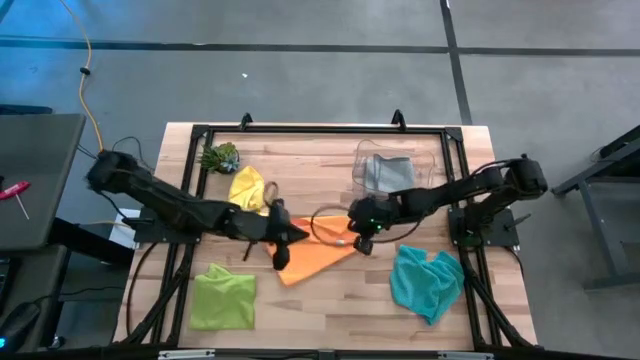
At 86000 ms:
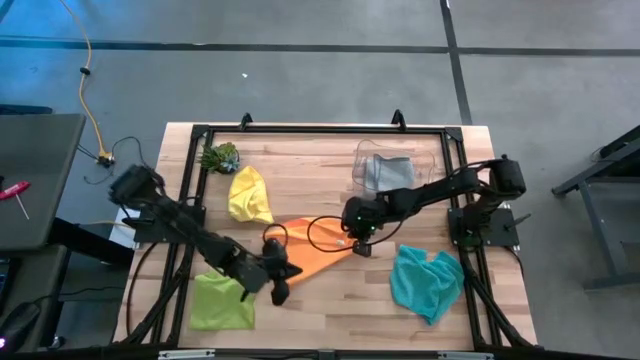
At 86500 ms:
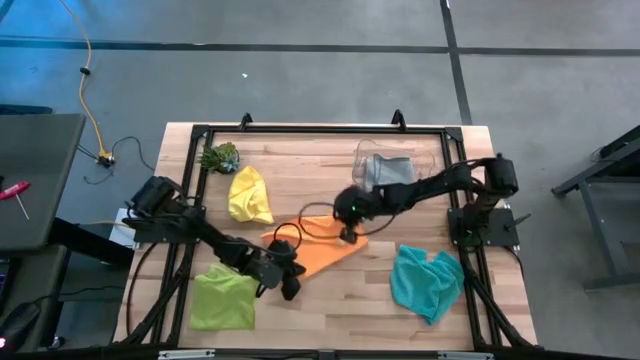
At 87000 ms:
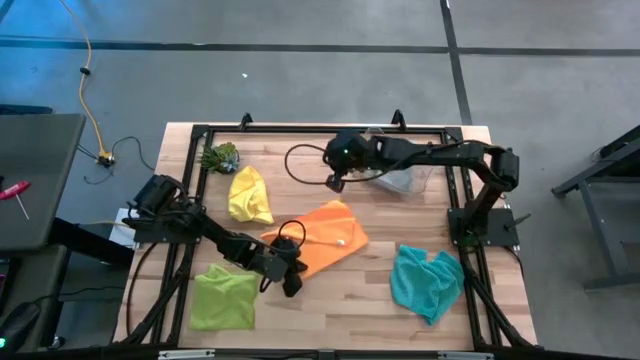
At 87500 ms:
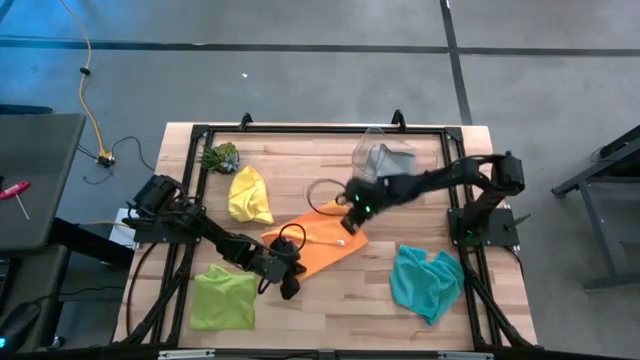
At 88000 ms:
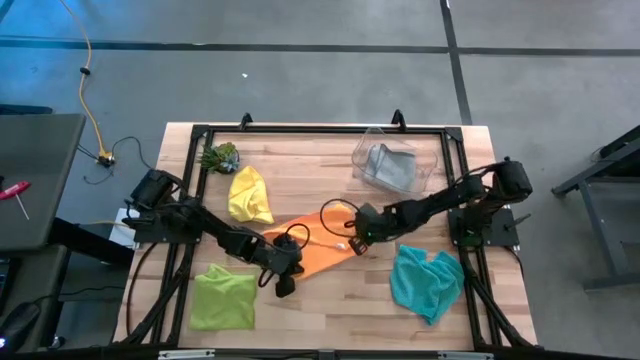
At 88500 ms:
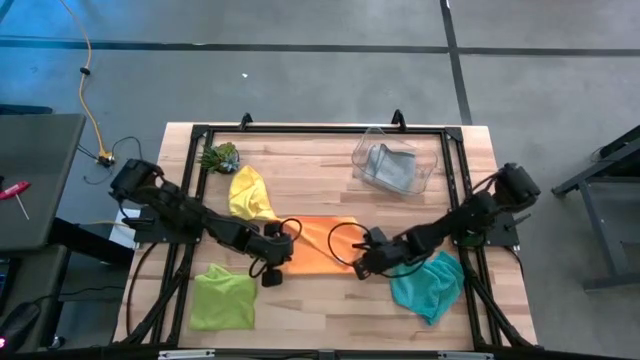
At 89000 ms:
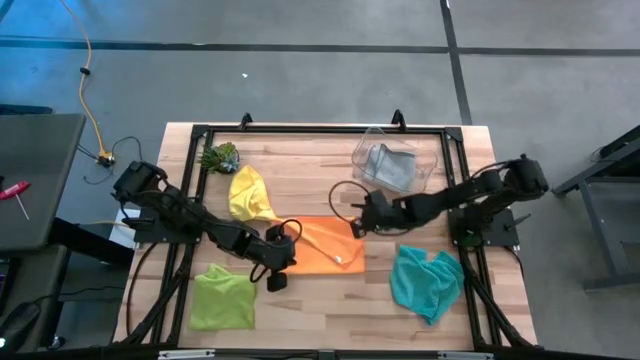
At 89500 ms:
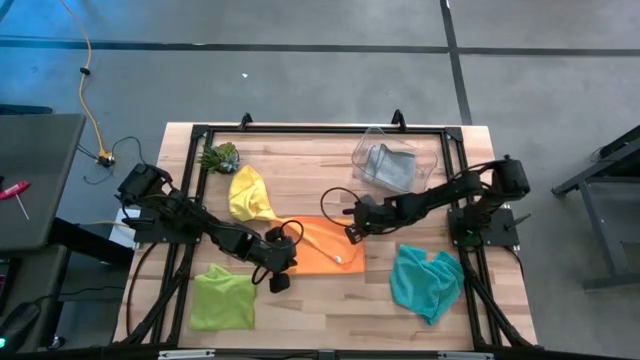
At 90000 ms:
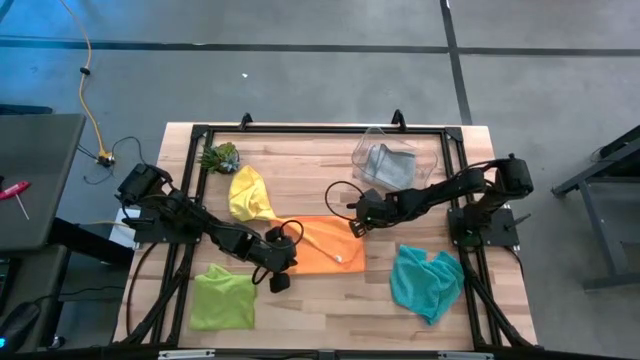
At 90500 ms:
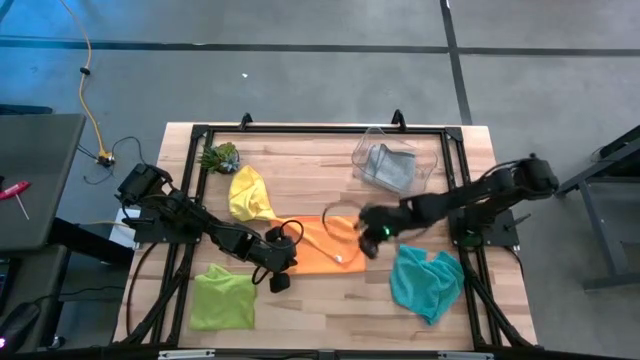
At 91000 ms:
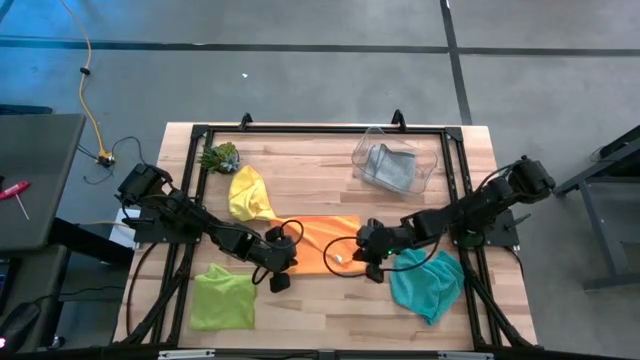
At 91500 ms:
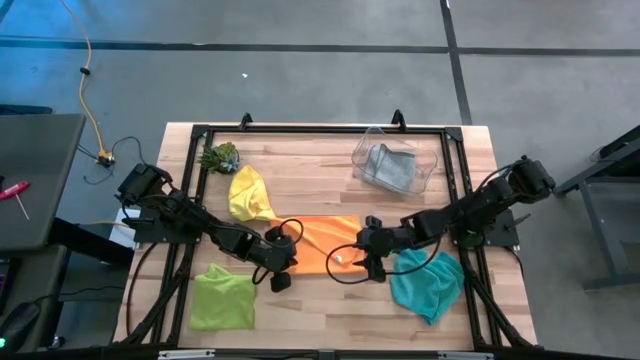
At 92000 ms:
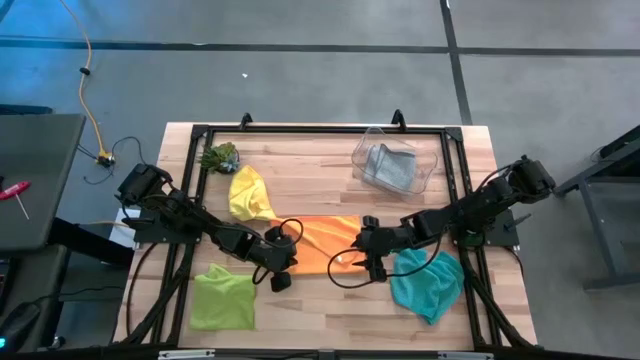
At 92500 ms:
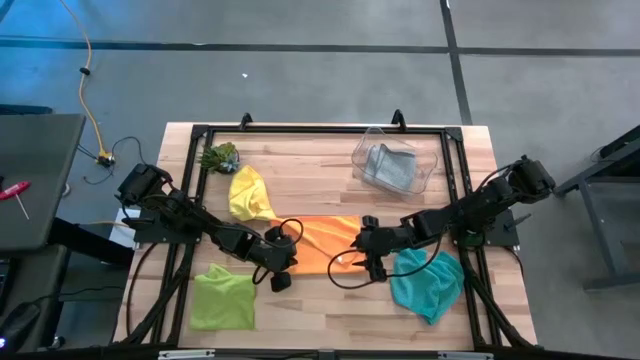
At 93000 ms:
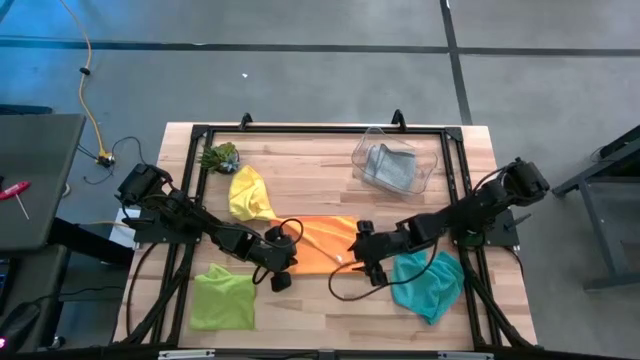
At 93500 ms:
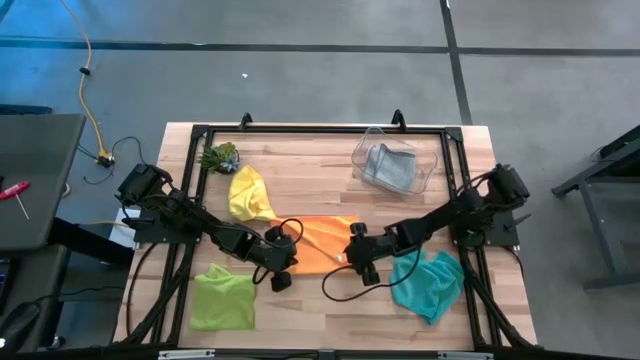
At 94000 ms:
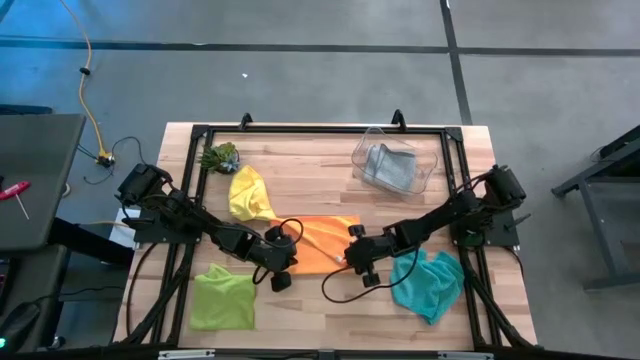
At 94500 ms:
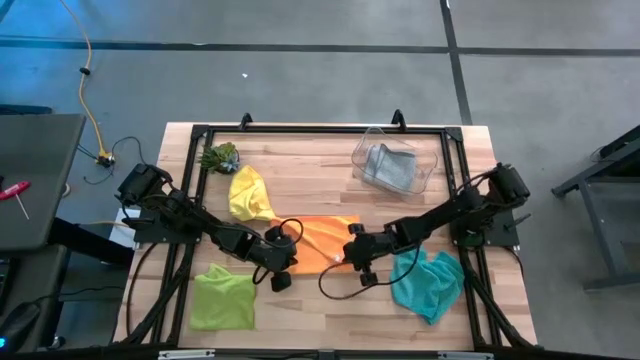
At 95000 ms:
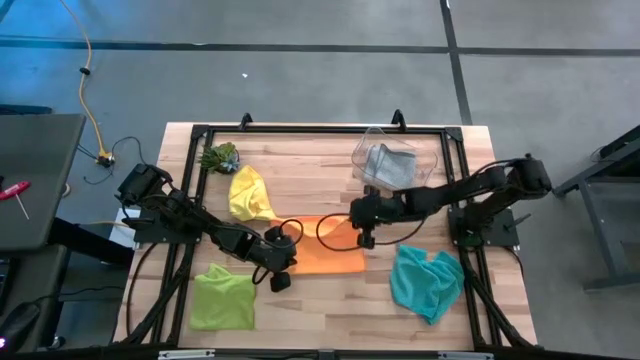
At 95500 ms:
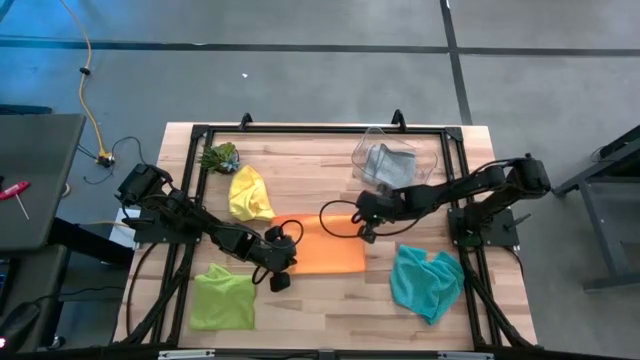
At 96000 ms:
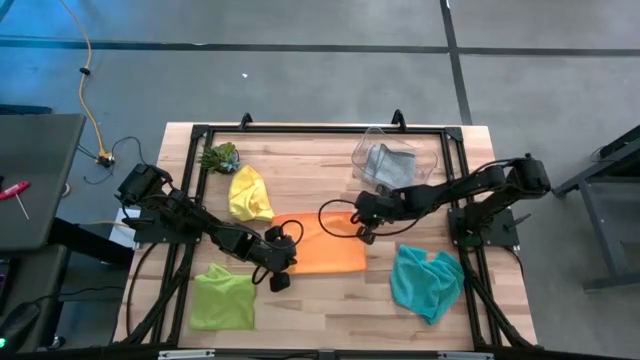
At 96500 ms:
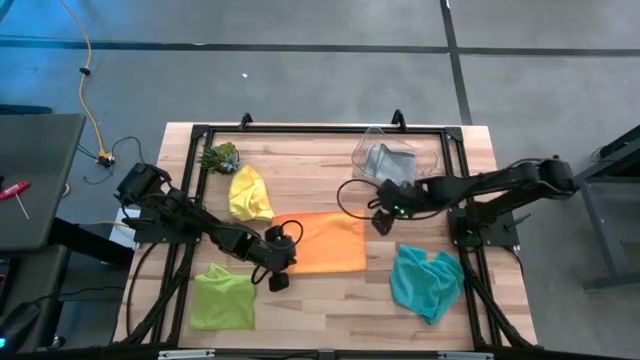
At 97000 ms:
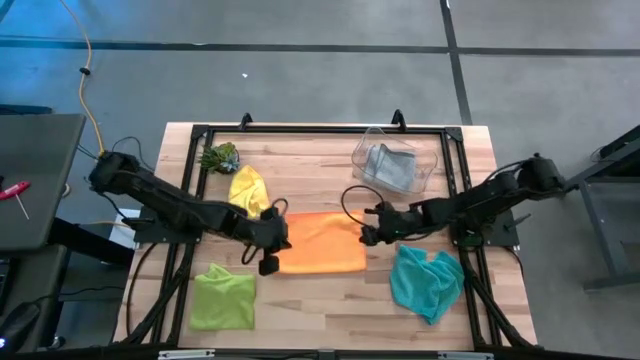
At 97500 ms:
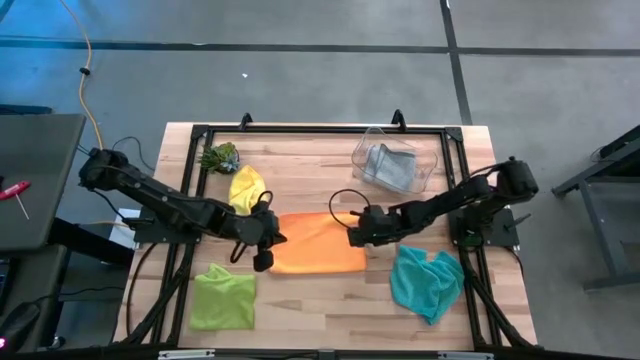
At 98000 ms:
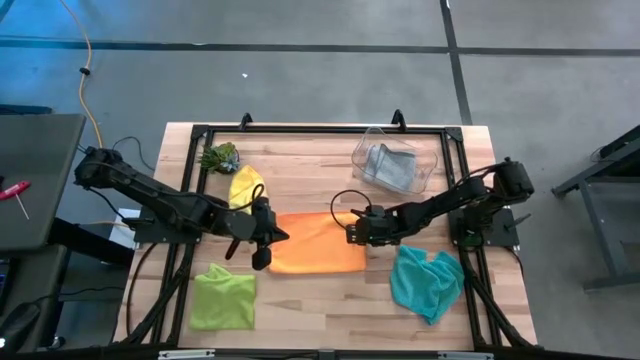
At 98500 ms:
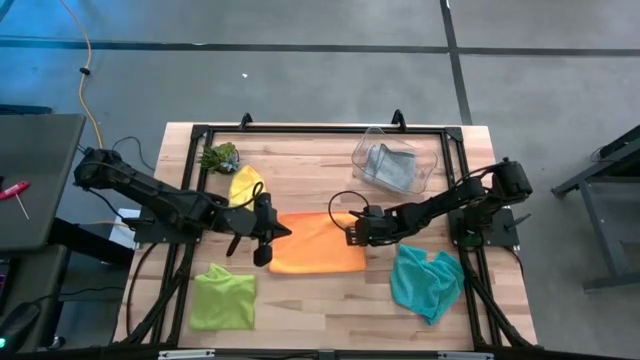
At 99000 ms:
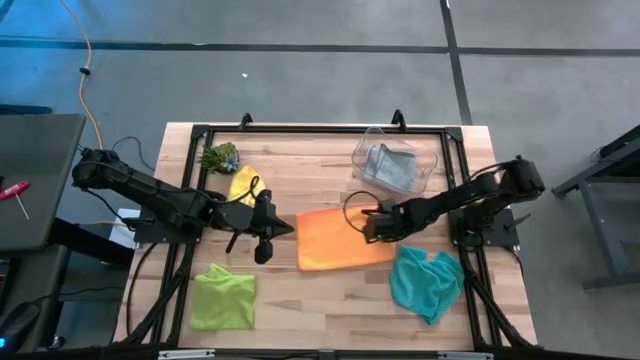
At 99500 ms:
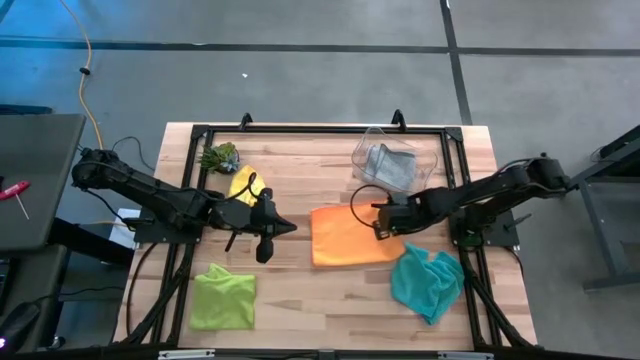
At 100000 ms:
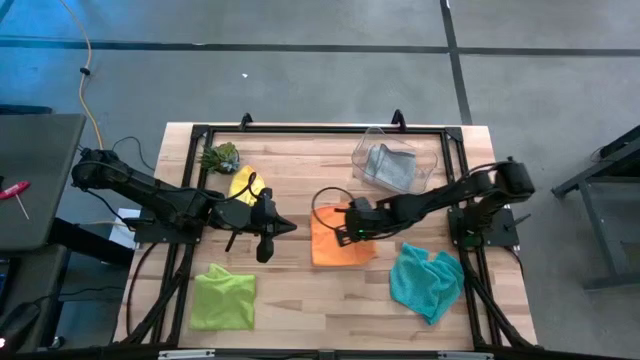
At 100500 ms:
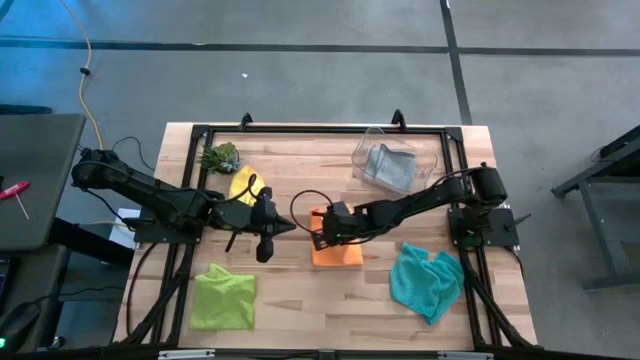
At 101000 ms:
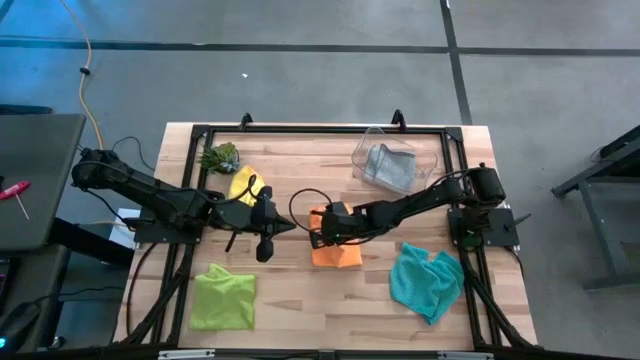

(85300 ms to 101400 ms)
Task: Fold microfiber towels
Fold the orange microfiber towel

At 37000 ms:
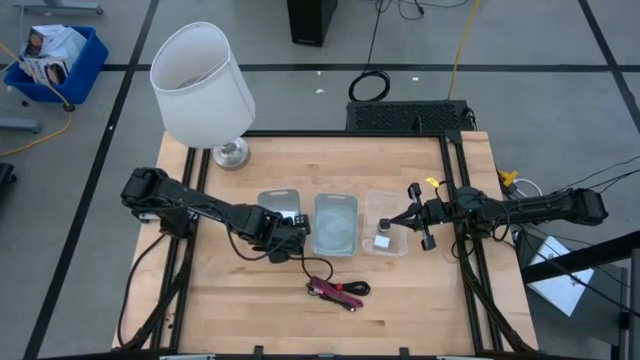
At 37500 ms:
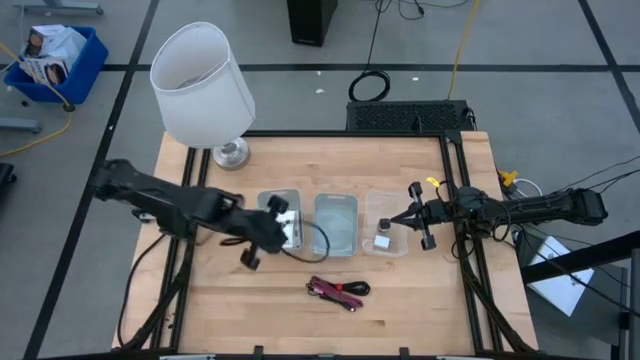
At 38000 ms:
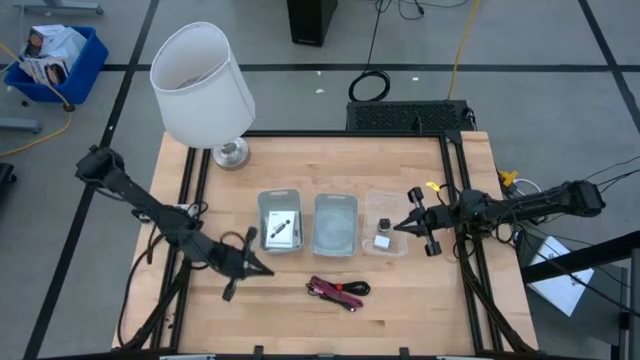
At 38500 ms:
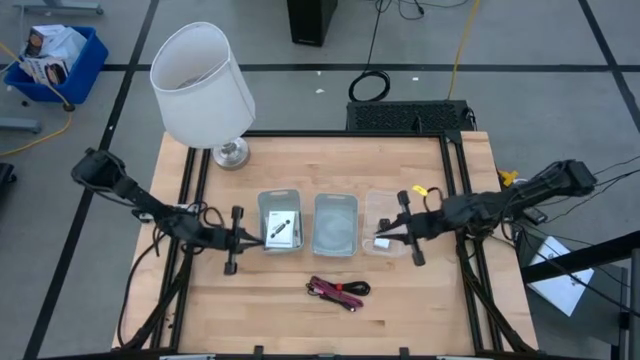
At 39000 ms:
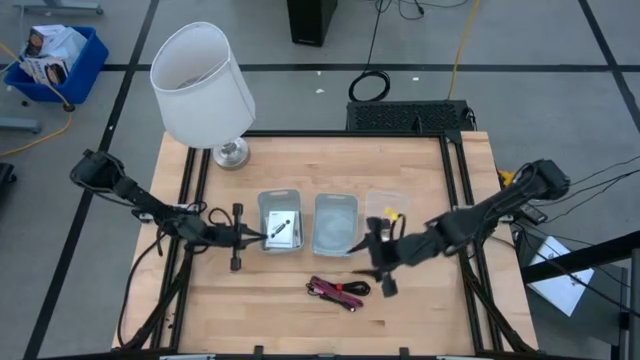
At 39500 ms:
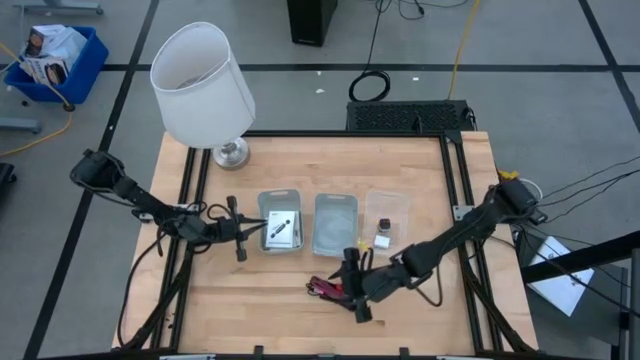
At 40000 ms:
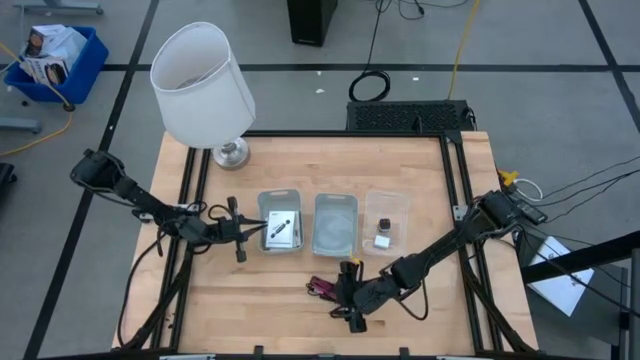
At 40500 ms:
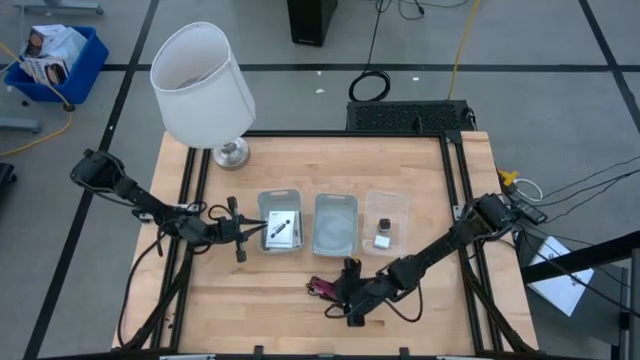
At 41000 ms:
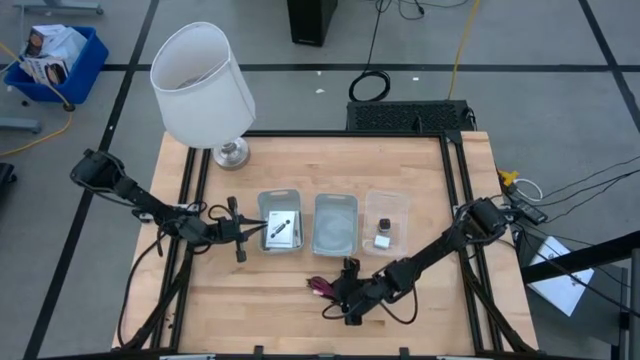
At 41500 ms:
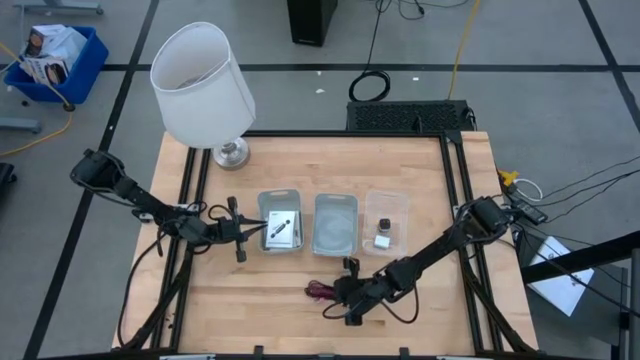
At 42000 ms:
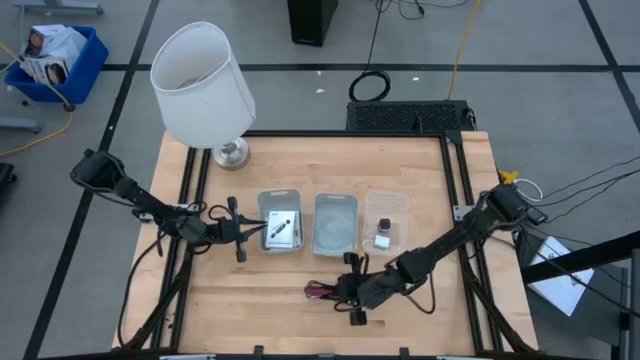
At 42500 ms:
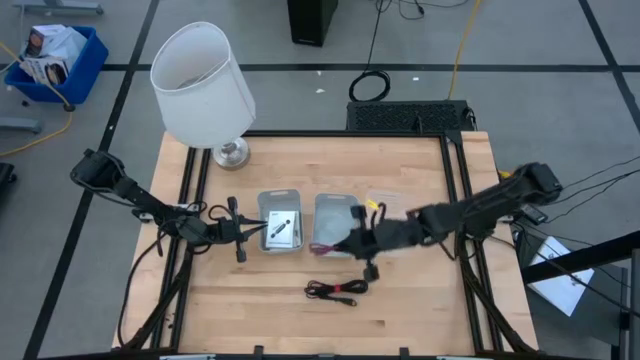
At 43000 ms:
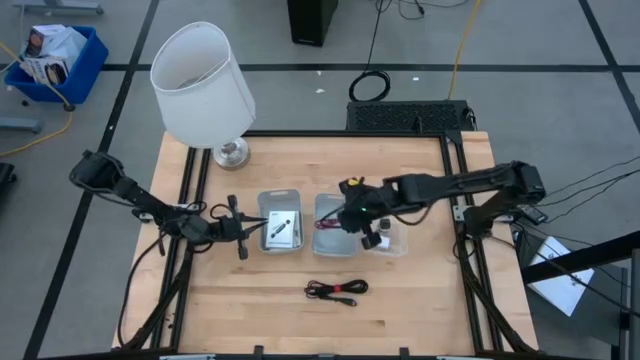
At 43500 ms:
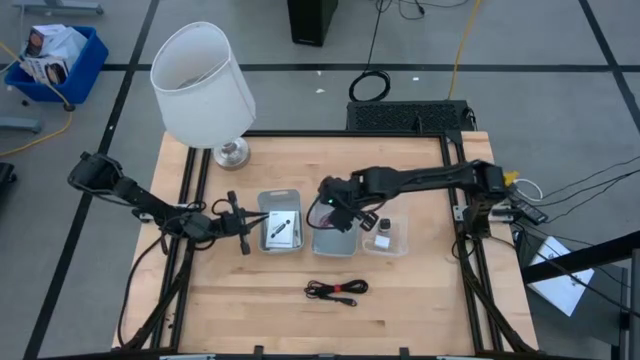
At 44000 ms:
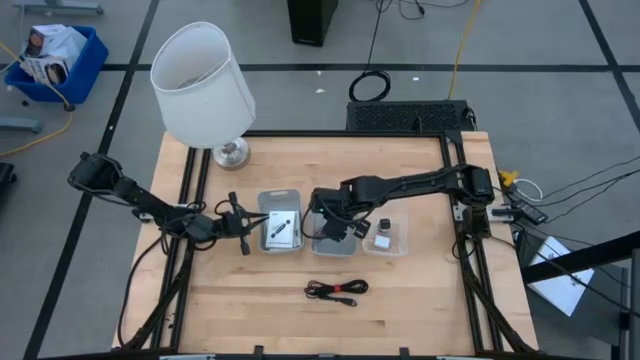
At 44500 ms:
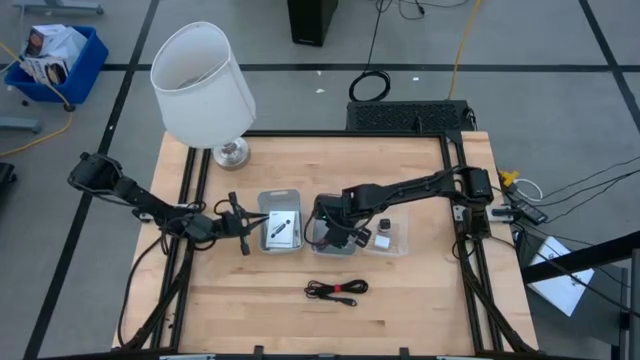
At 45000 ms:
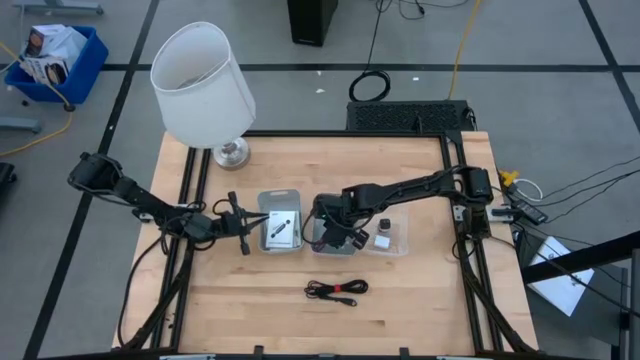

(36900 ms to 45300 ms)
Task: Pick and place items into bin
Put the pink charger cable into the right gray bin
